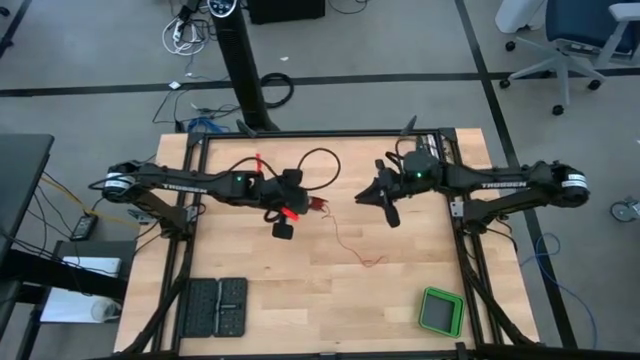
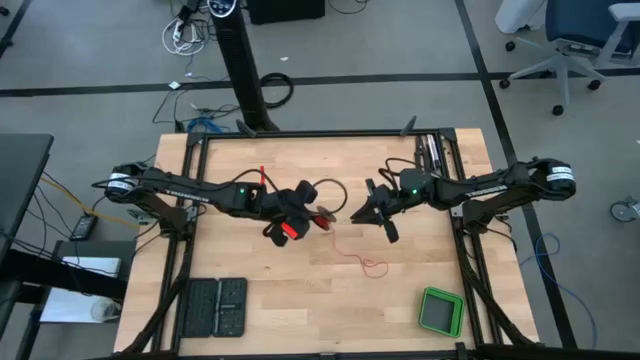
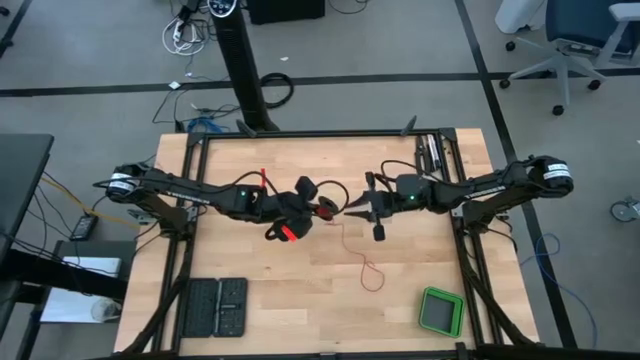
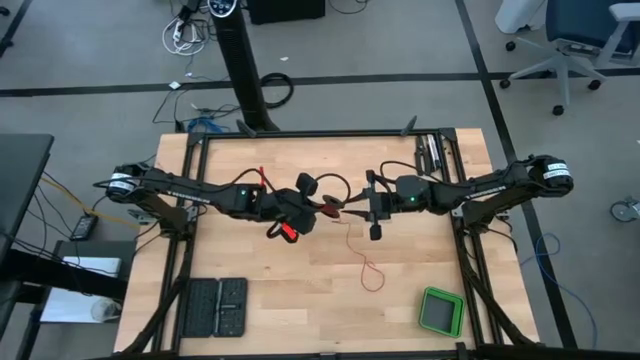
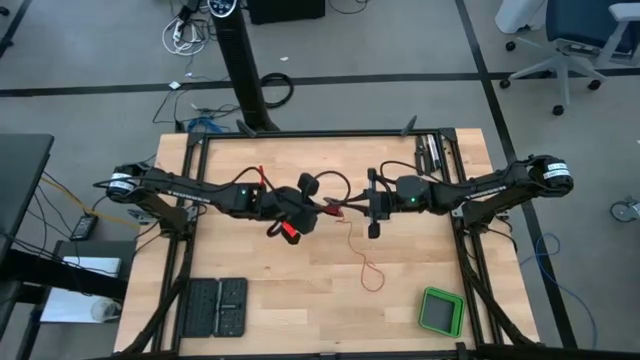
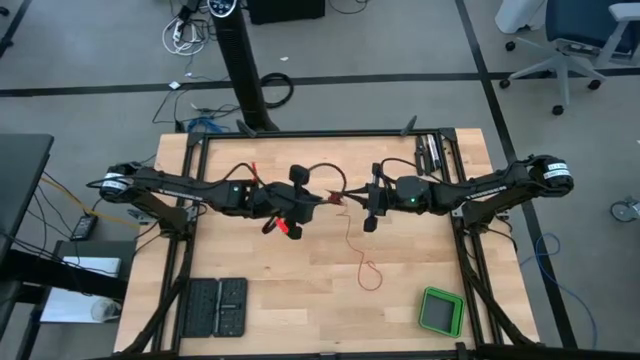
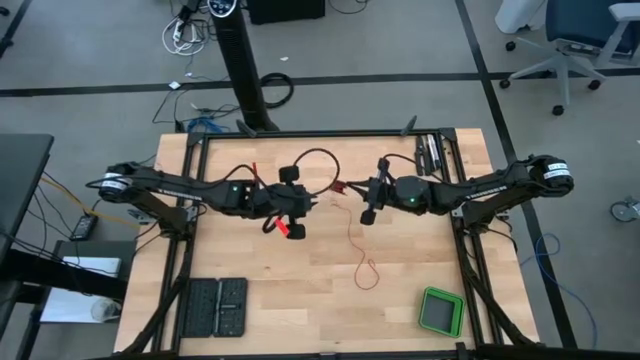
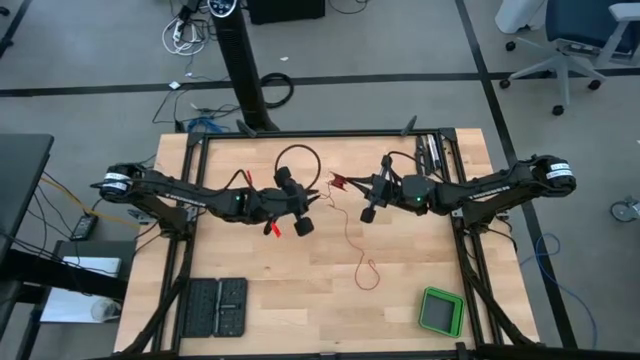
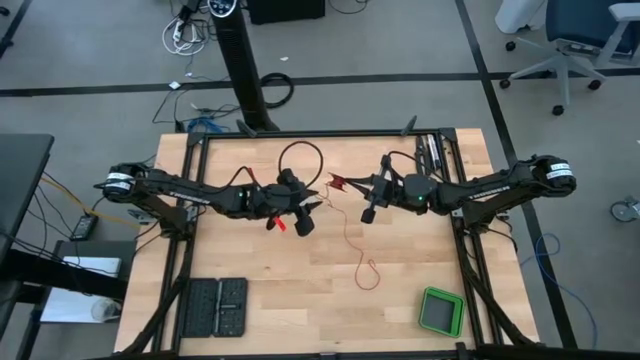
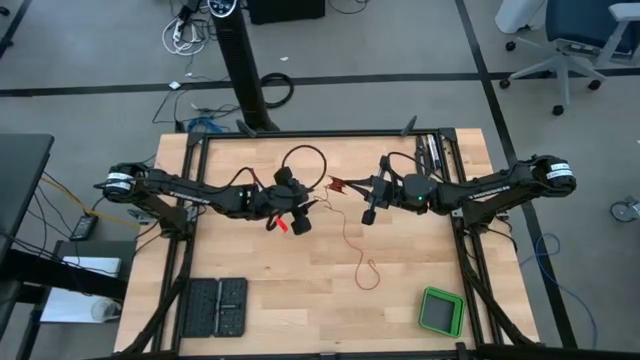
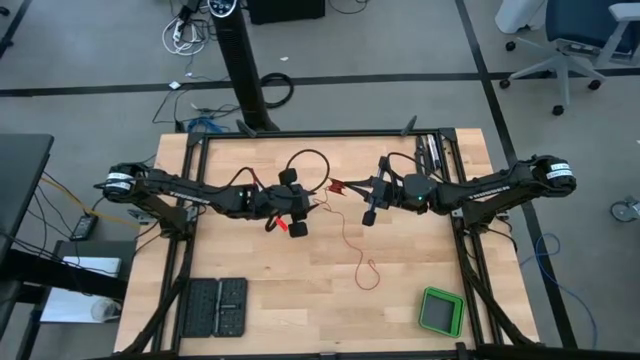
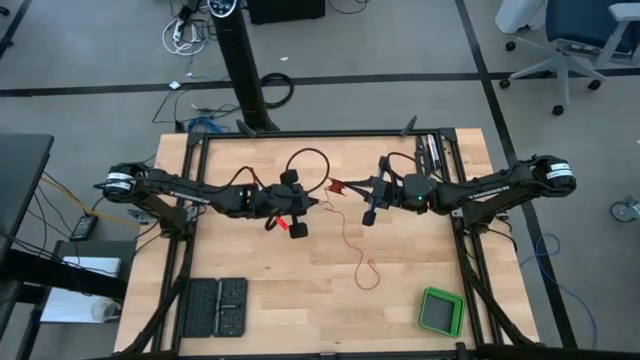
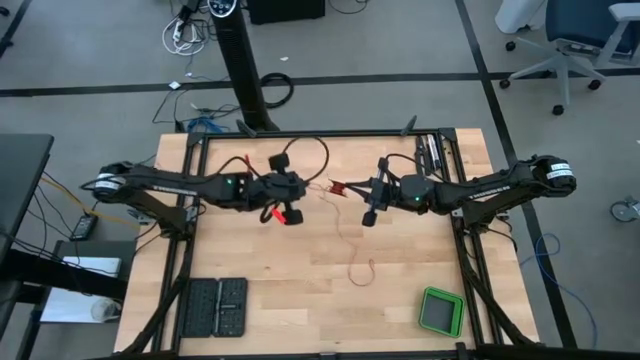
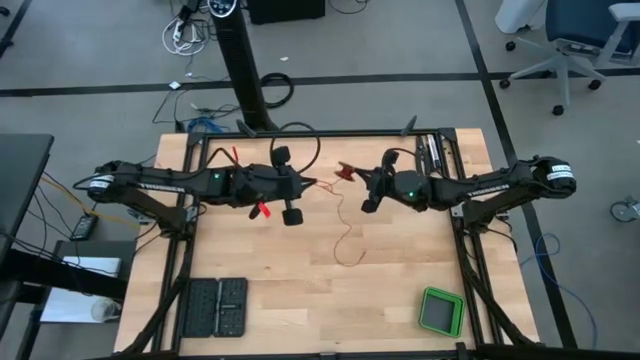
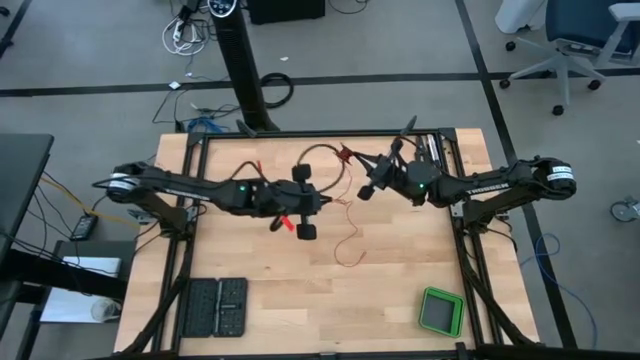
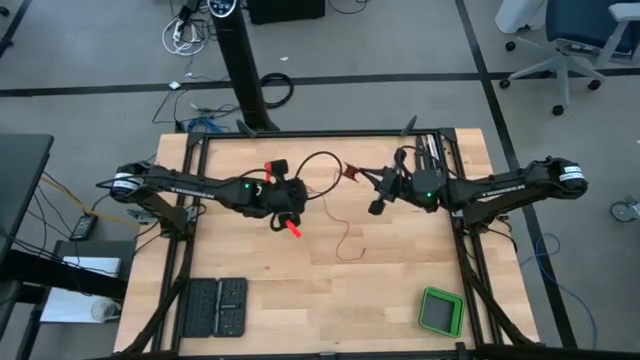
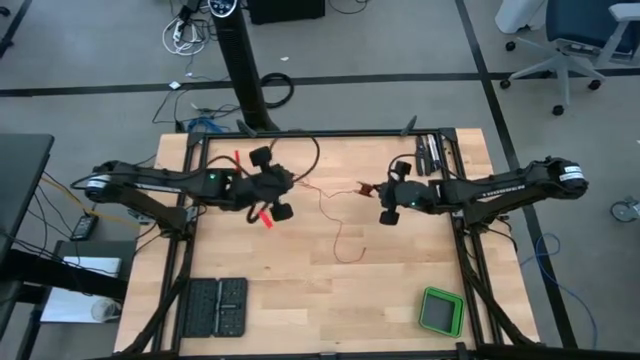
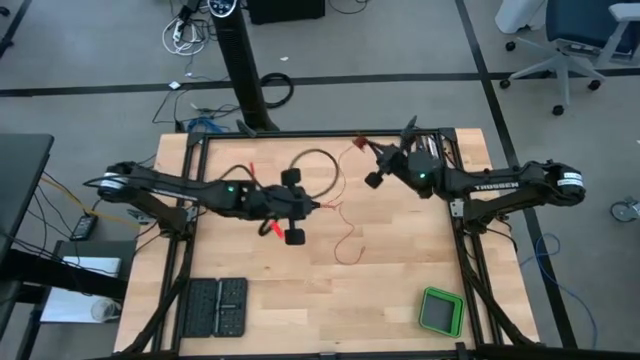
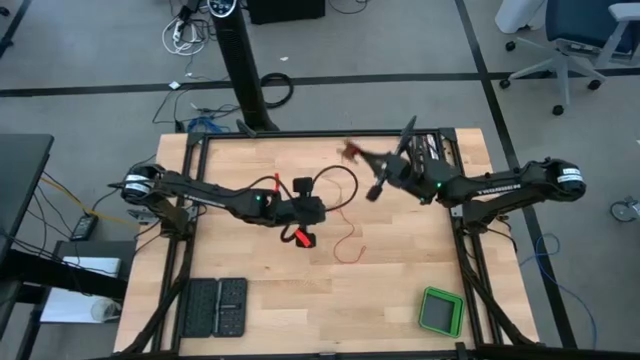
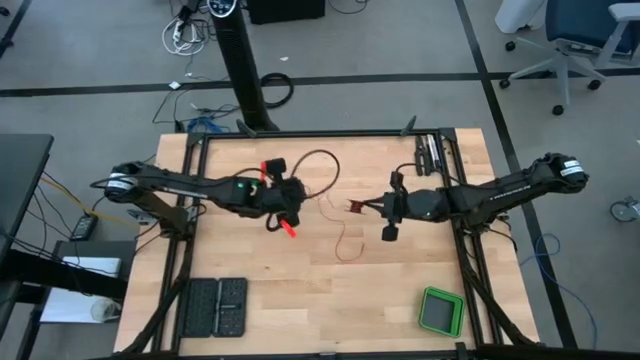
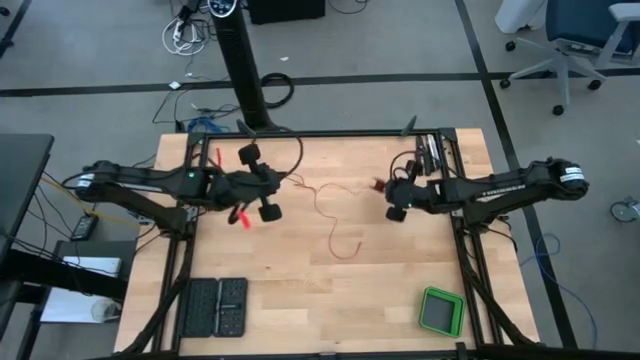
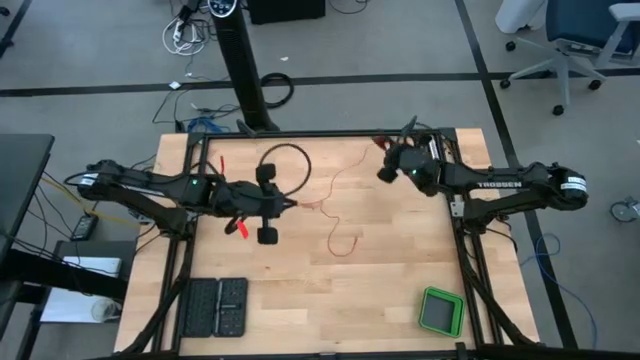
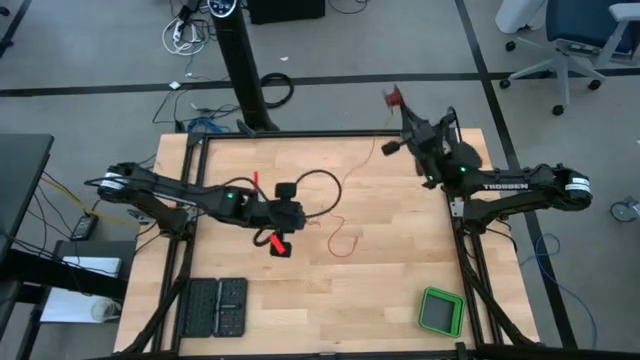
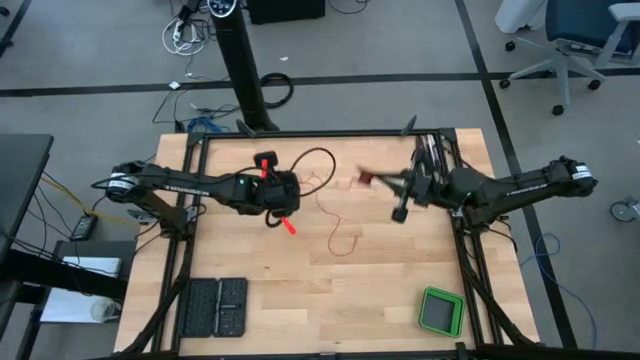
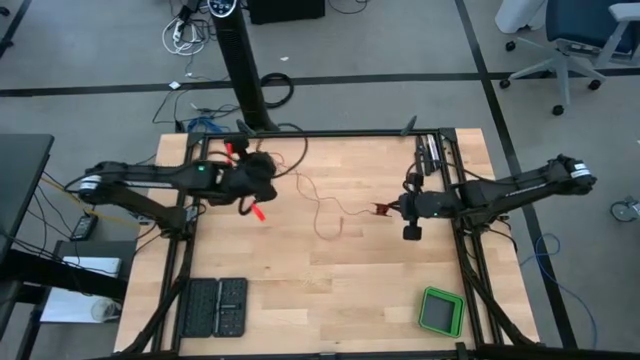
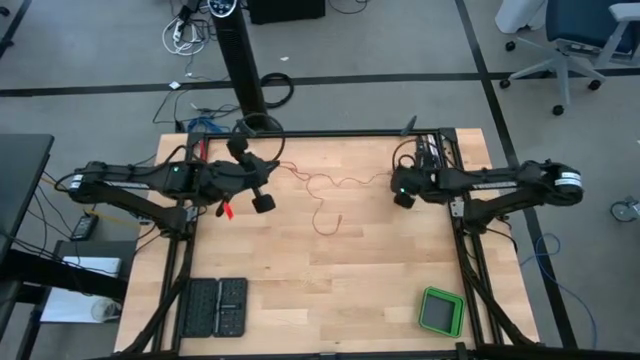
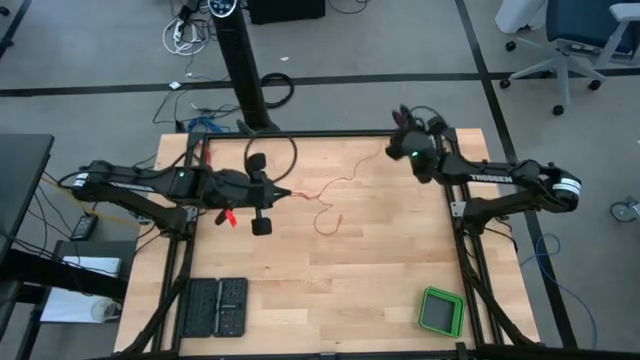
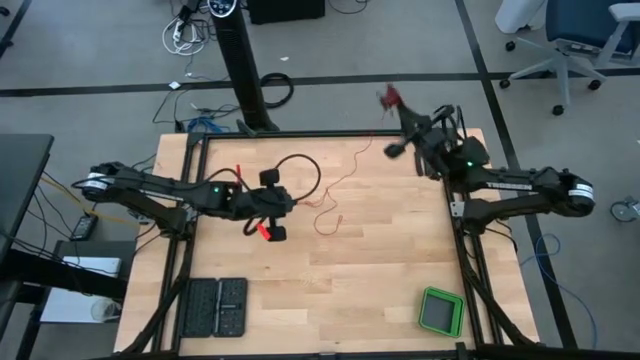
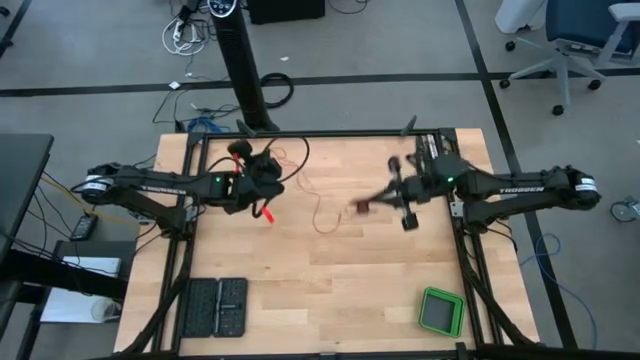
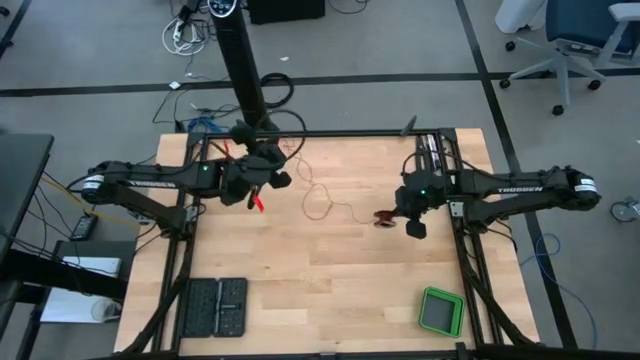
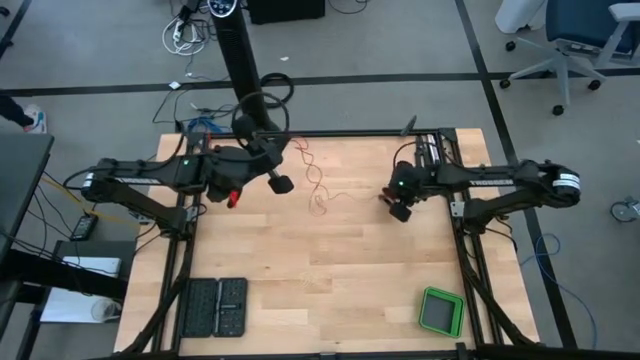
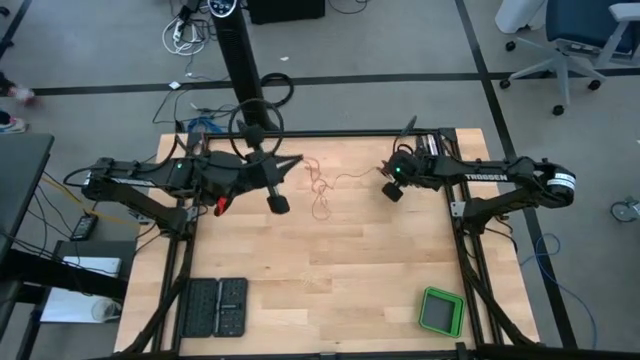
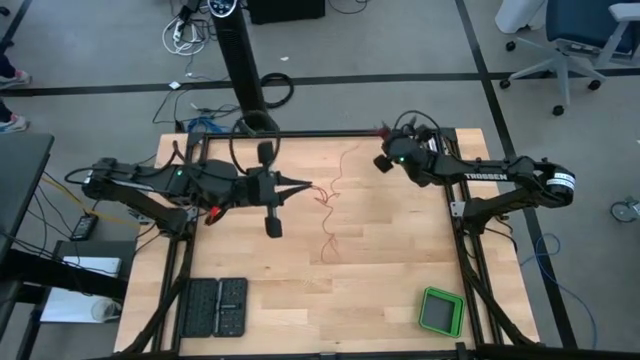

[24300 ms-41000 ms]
Task: Coil cords
Uncoil the red wire cable from the black spool

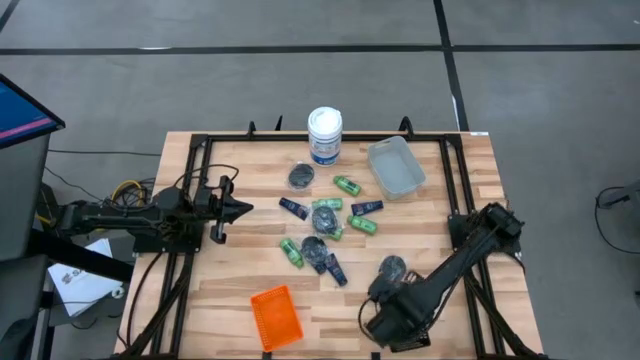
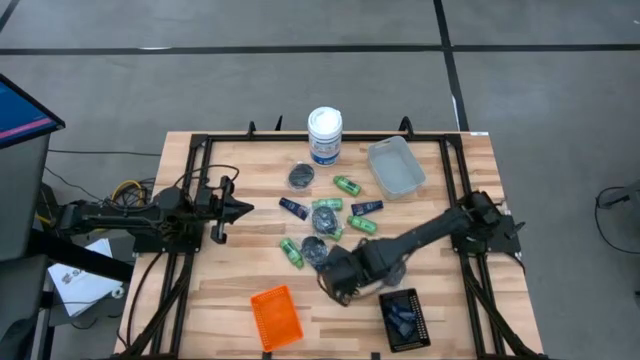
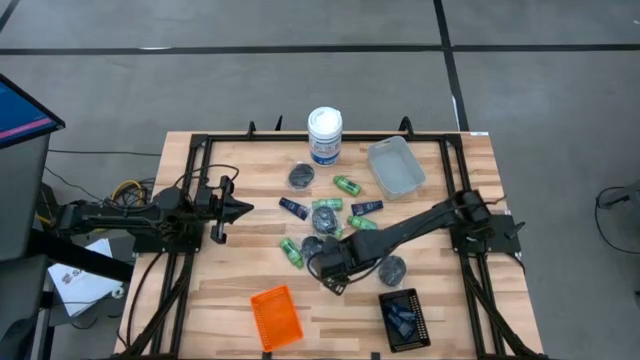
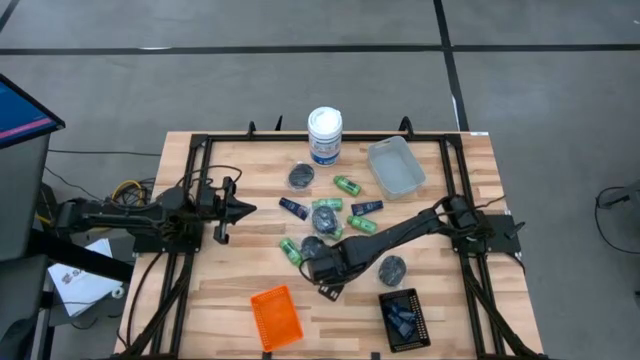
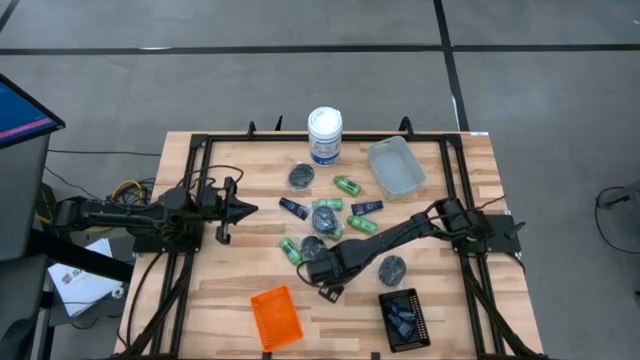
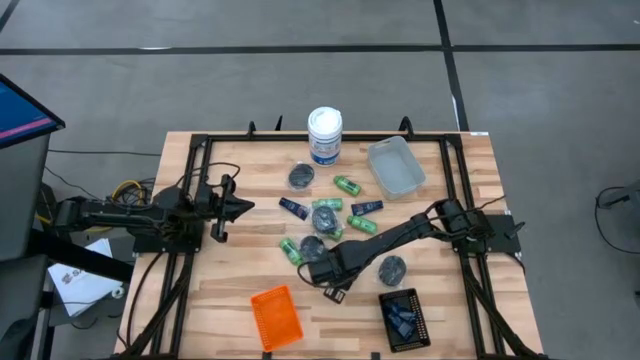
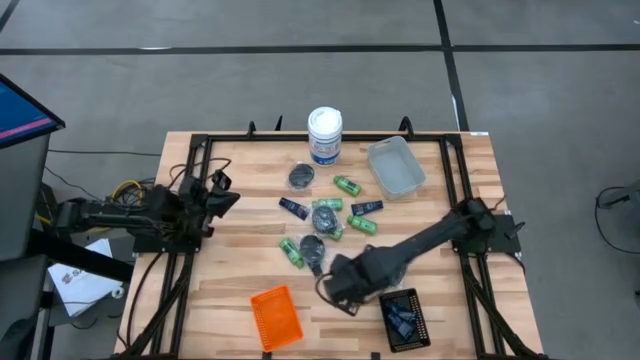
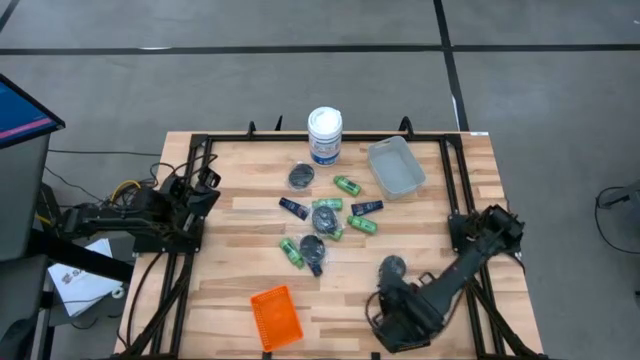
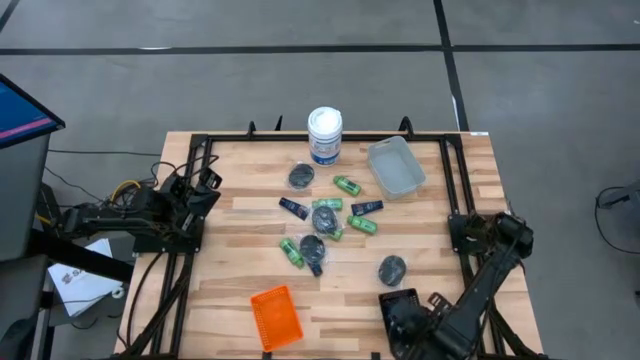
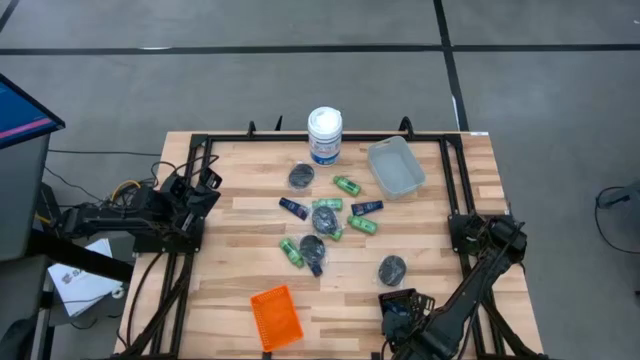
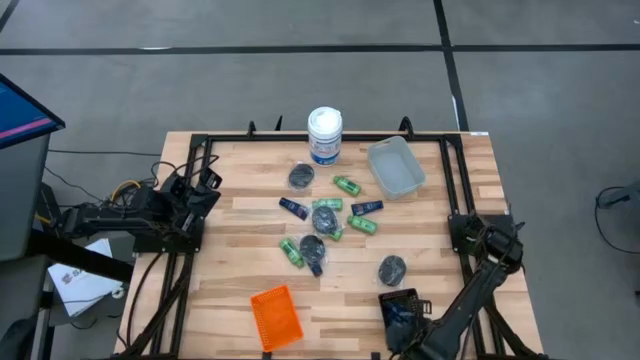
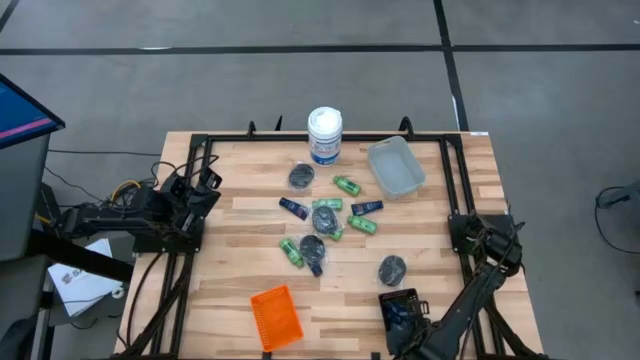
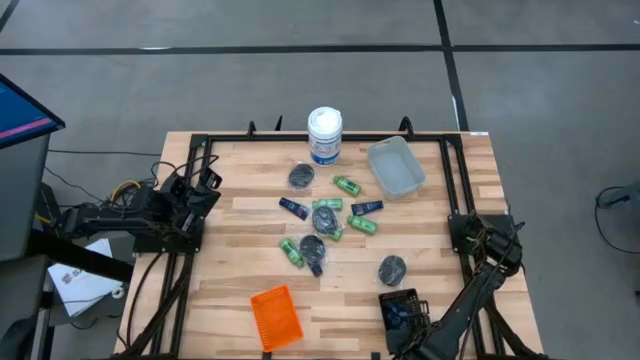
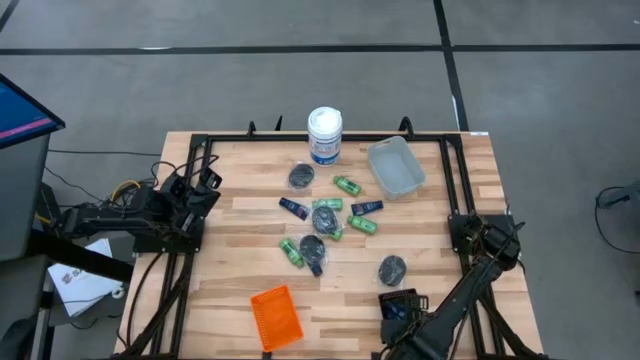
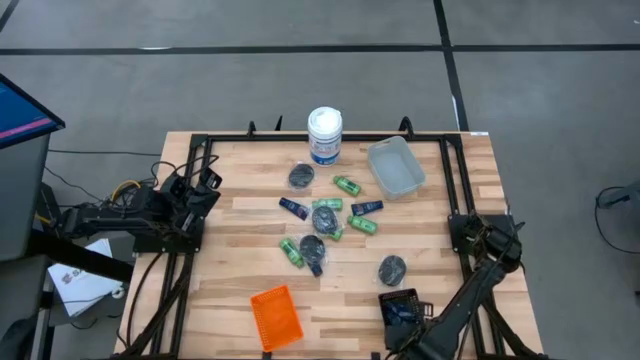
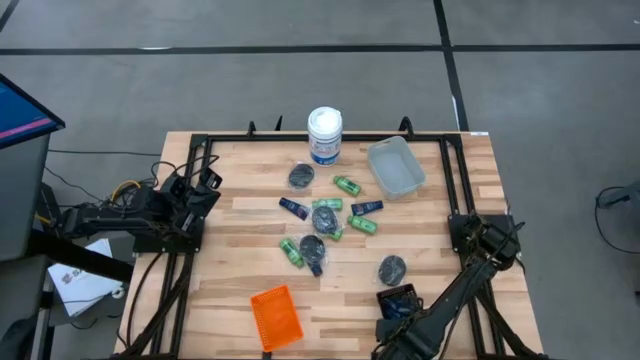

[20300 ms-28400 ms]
Task: Pick & Place Travel size toiletries
Put the blue shave cream into the black basket
